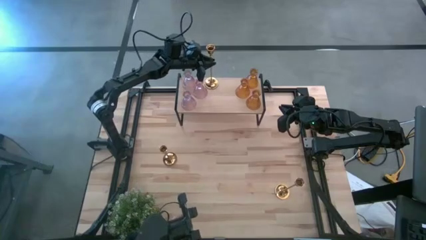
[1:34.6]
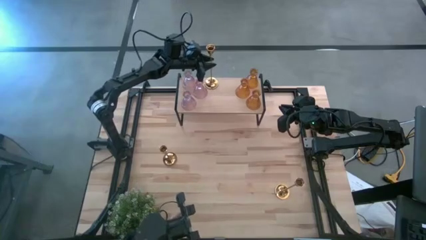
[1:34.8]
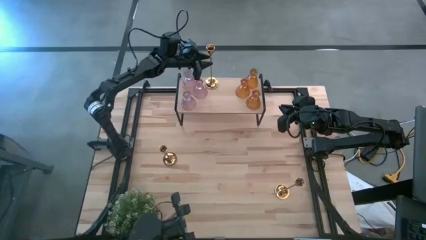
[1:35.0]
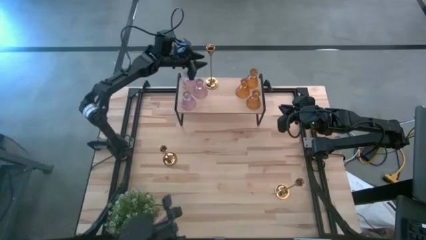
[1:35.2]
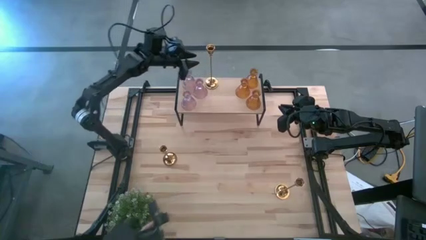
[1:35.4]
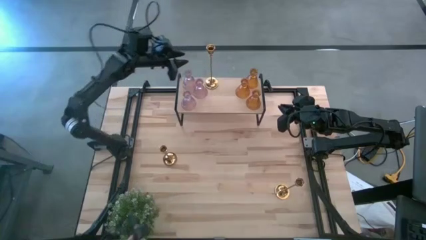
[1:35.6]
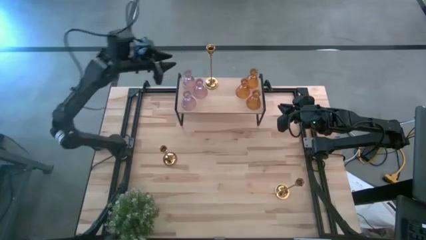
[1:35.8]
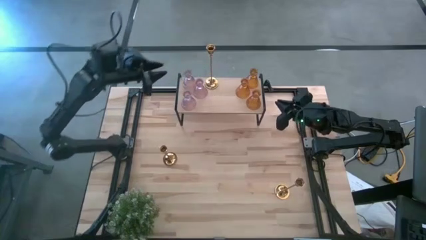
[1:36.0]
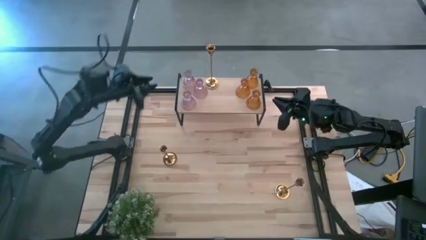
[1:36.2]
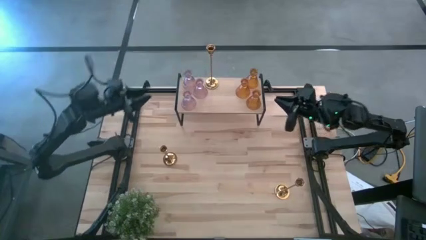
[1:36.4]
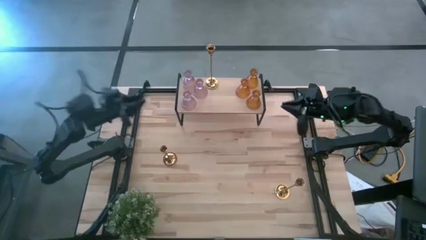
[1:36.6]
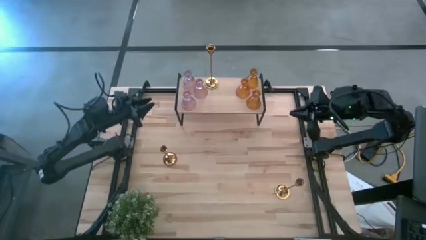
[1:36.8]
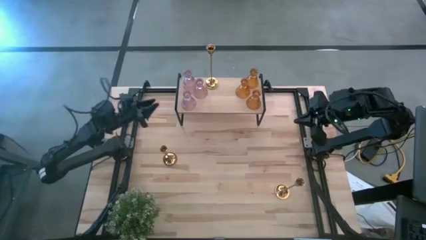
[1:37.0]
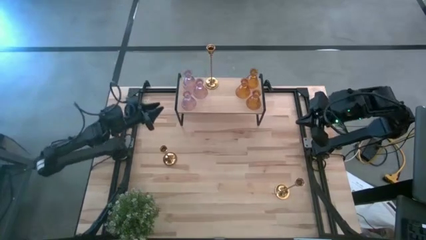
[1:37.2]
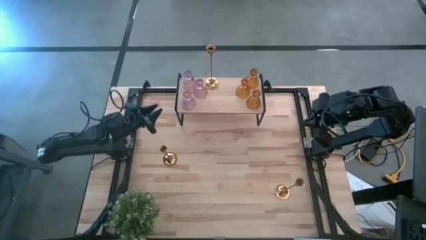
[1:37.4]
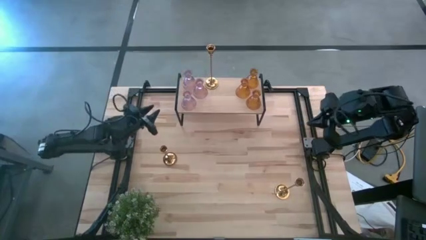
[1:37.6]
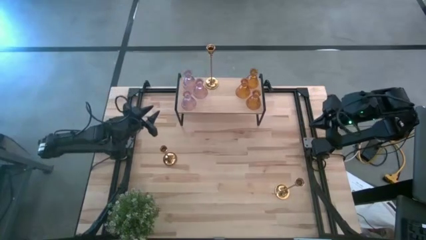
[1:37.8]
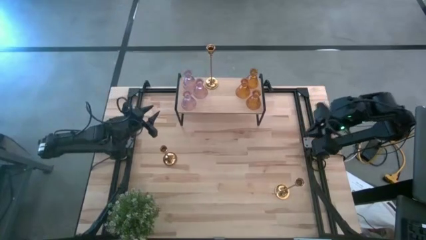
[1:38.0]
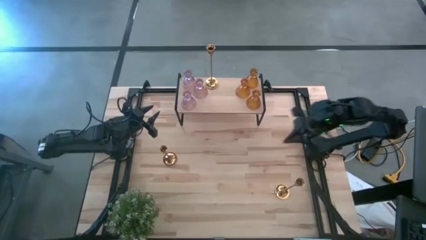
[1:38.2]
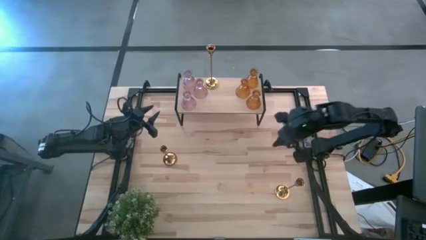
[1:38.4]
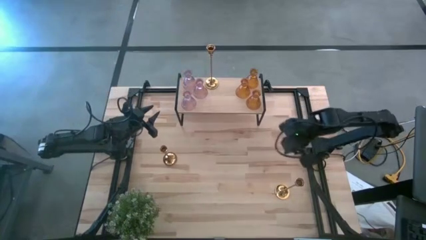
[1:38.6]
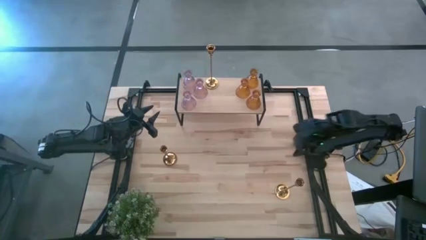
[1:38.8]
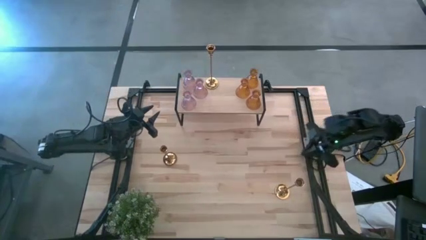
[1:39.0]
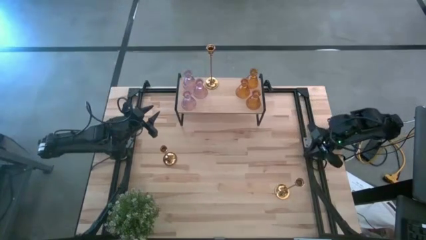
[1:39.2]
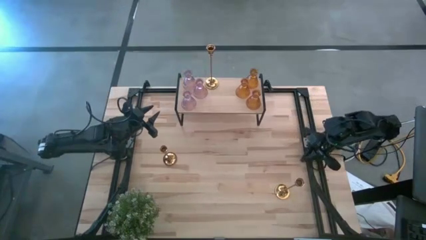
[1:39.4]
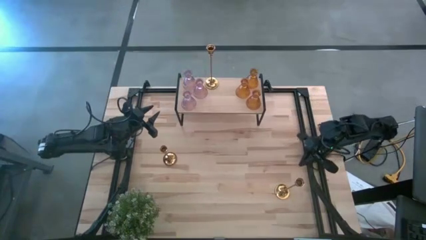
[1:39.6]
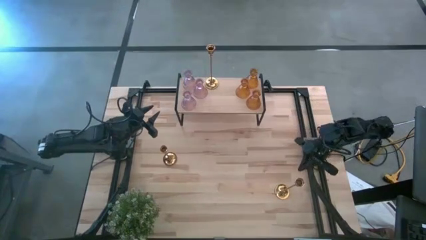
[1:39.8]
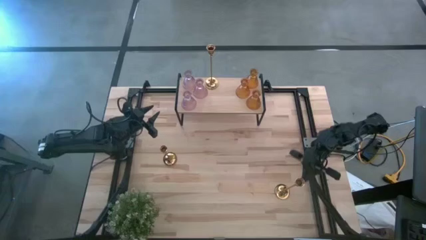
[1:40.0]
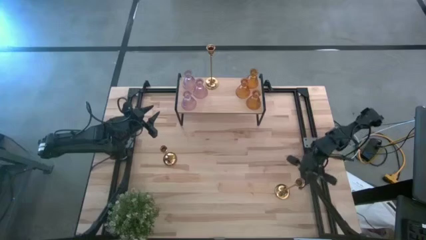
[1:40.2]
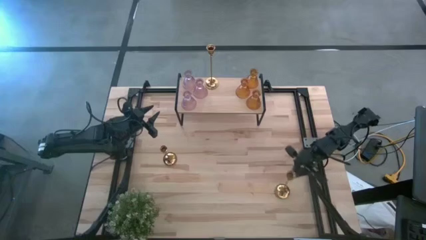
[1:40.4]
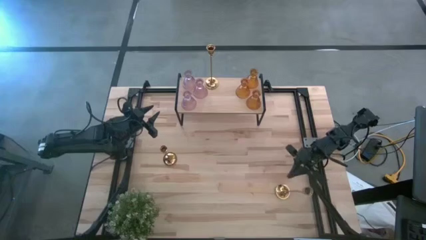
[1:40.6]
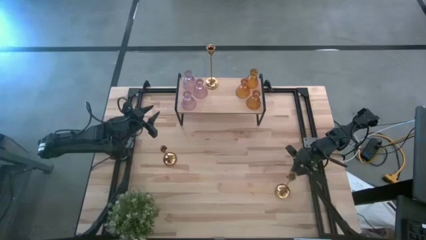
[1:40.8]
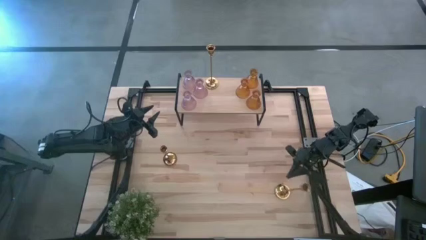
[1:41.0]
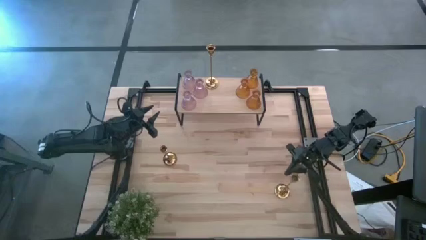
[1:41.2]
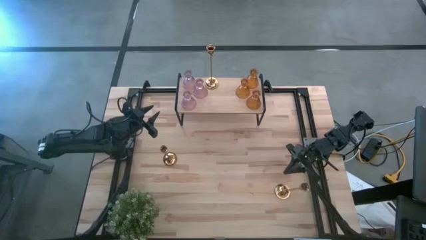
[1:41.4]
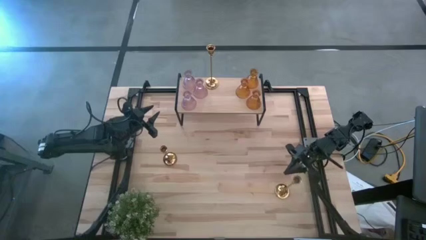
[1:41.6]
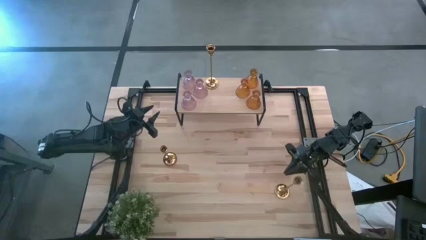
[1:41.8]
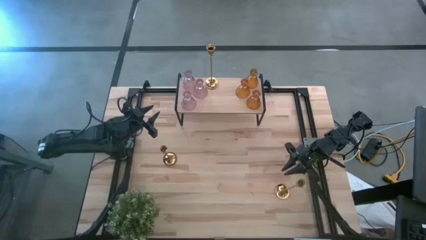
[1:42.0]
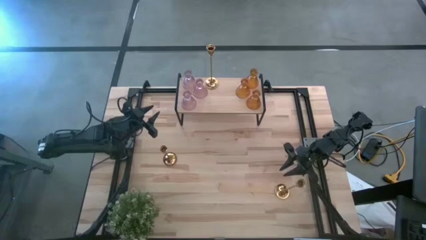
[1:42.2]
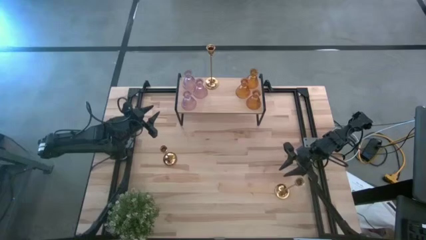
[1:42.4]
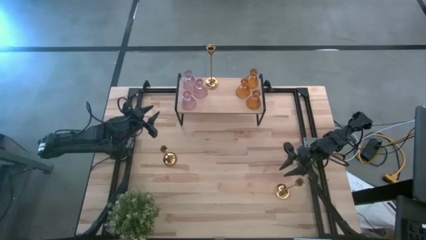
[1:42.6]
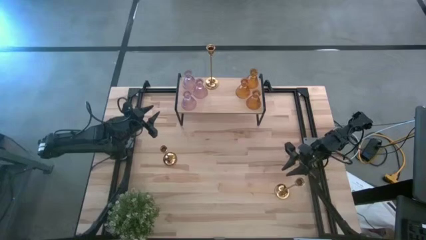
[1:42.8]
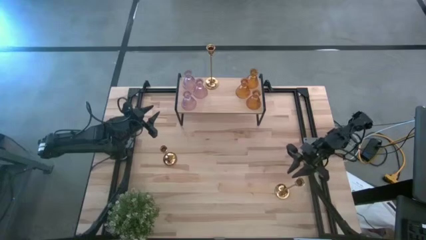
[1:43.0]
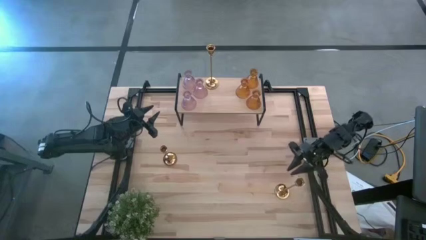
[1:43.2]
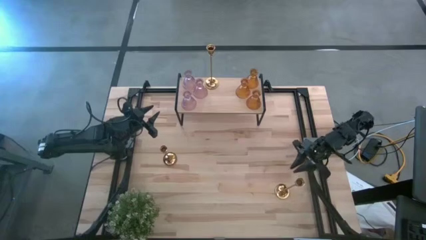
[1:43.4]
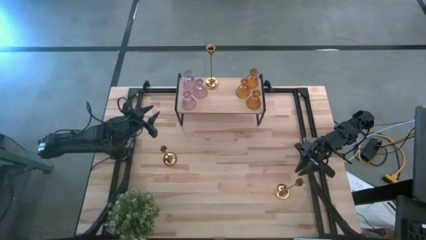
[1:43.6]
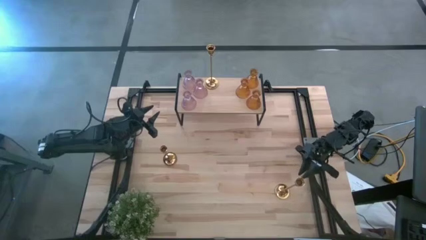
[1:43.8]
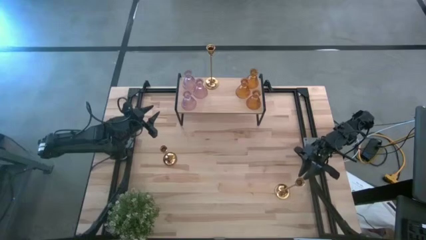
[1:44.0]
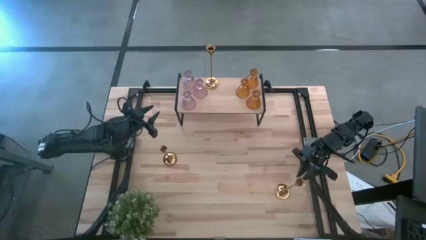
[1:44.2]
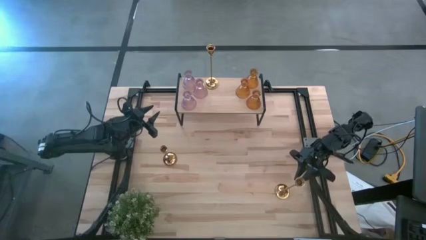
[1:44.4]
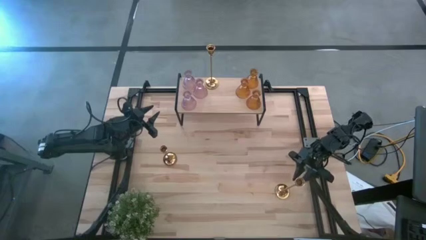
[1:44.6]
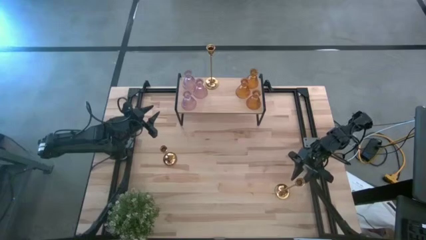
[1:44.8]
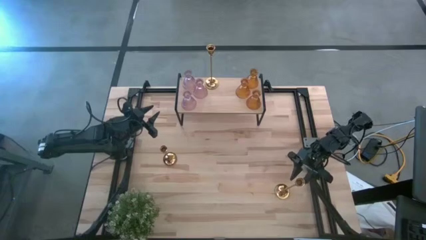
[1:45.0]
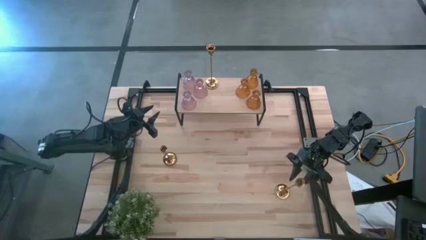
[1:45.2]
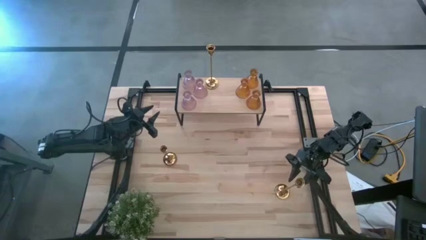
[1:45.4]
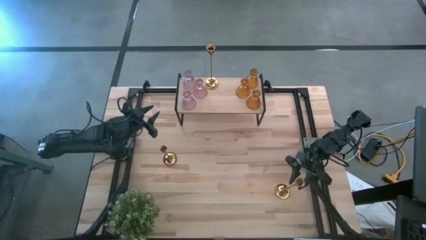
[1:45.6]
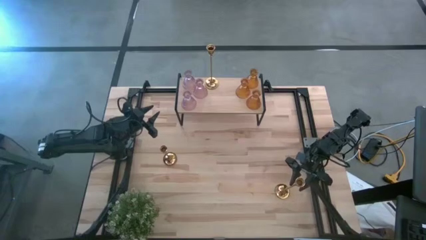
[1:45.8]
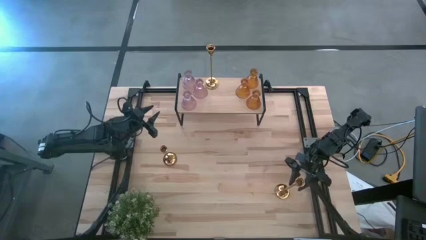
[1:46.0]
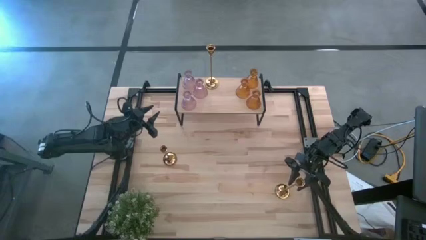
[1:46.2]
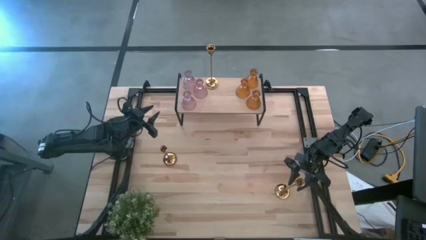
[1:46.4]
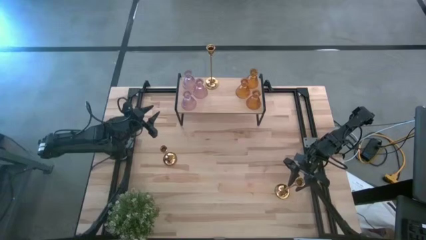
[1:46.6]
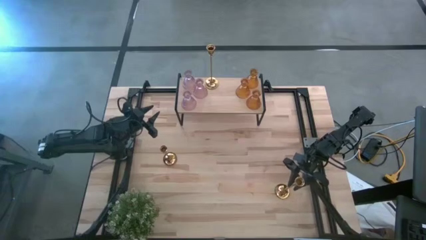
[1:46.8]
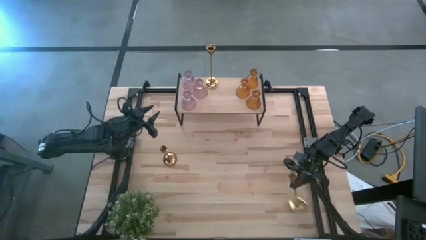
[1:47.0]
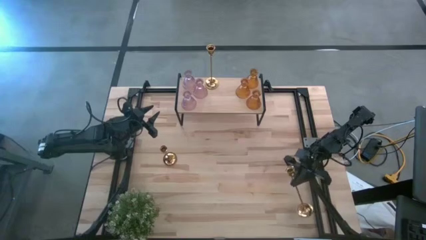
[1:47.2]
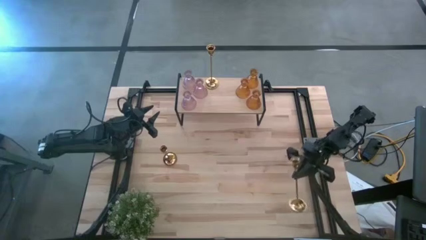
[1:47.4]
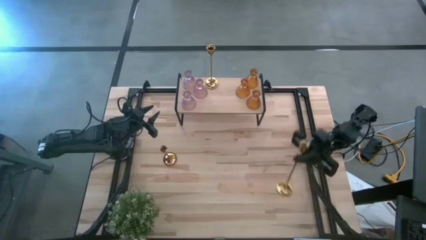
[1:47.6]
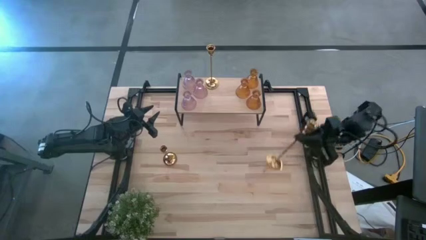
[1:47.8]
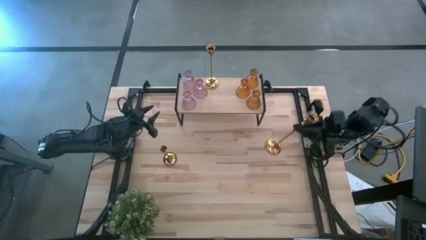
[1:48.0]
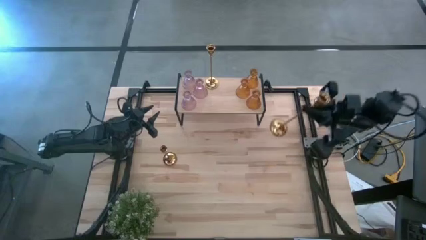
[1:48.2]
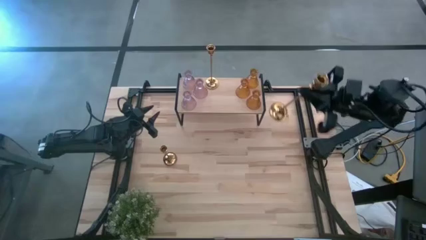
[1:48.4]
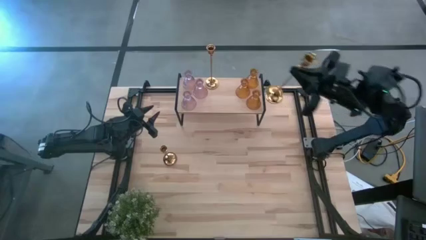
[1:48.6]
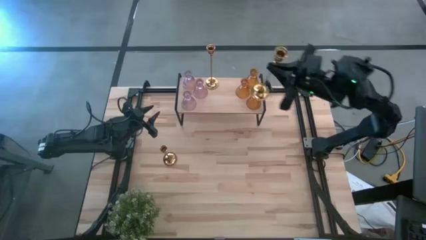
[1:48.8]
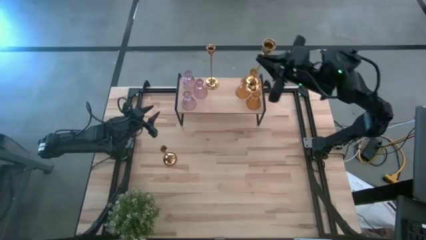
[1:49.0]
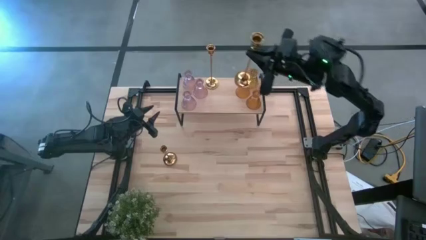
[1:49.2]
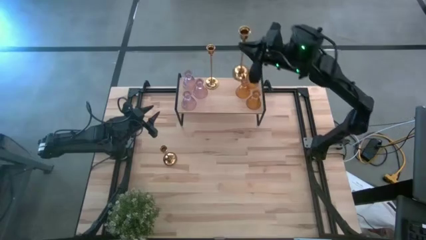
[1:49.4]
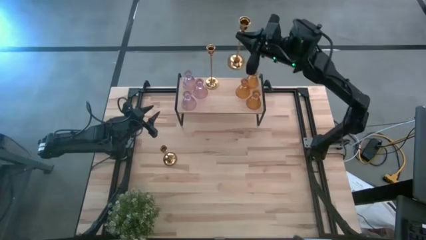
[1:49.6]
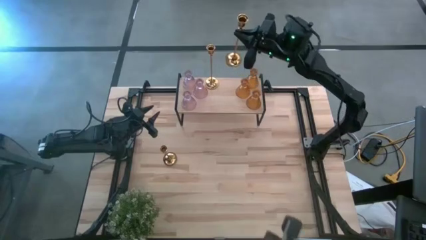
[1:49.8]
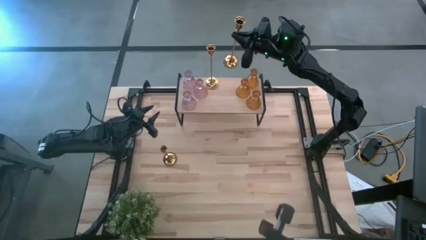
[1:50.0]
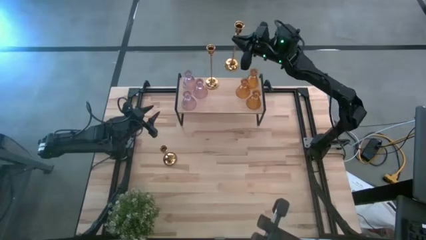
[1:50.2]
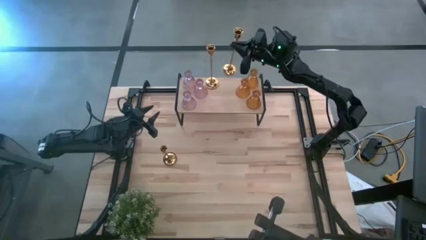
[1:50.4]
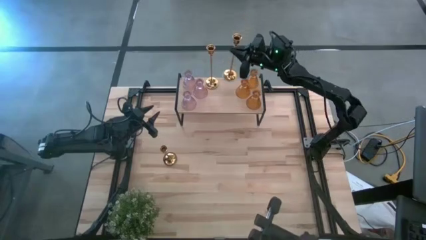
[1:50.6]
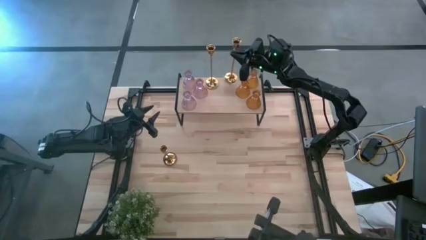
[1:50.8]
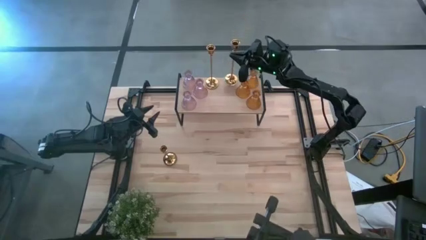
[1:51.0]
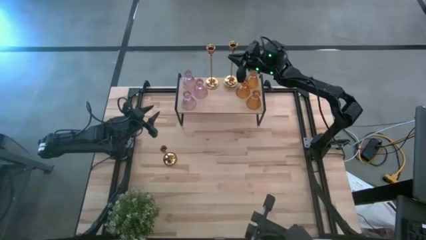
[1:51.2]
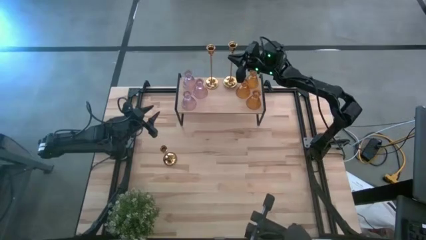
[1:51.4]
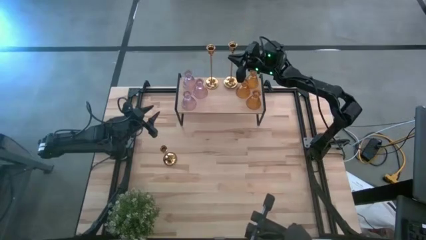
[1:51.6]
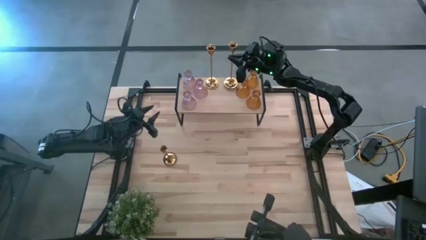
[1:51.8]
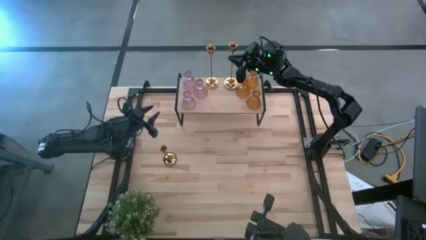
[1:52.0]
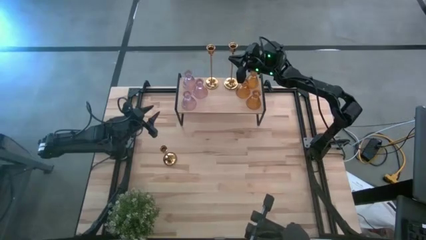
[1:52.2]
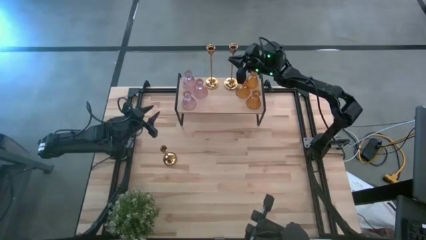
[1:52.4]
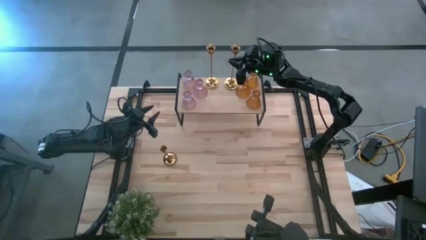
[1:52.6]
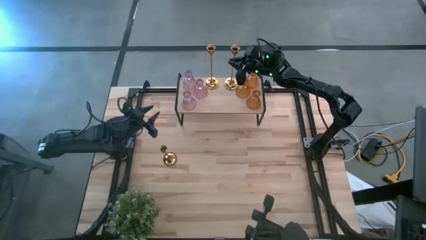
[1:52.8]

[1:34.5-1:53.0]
Task: Pick & Place candle stick holders
Put the bottom golden metal candle holder on the shelf
